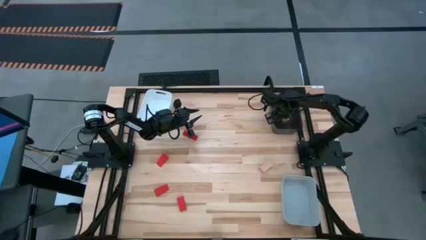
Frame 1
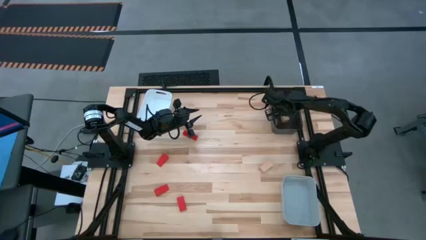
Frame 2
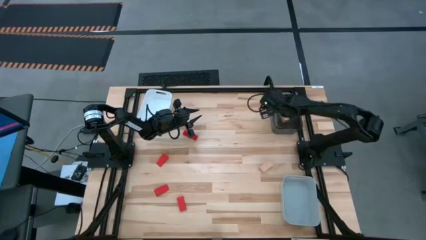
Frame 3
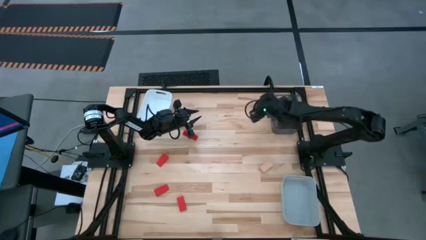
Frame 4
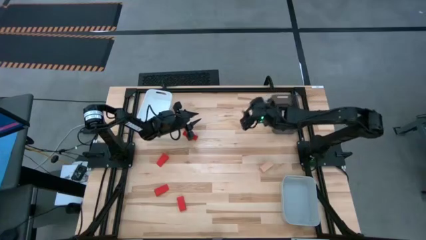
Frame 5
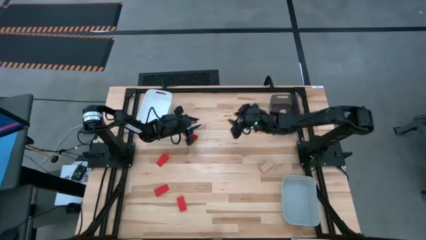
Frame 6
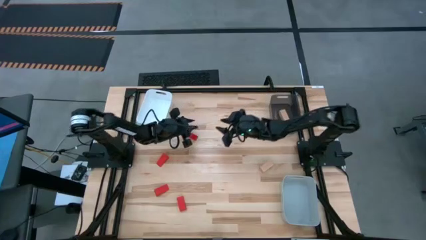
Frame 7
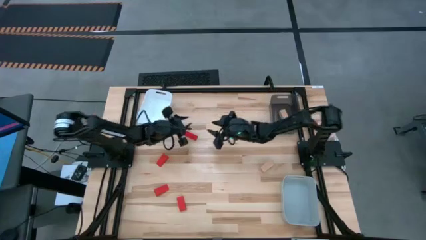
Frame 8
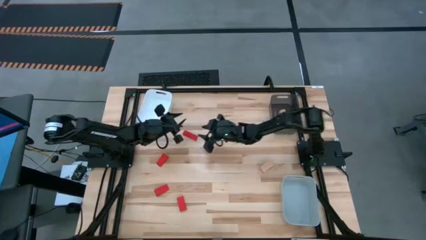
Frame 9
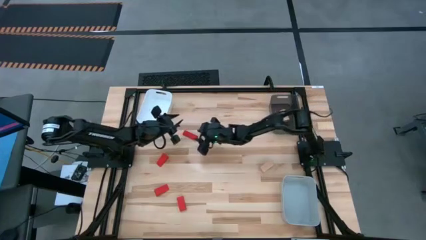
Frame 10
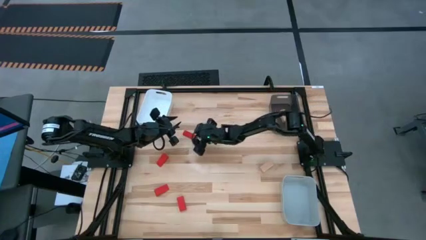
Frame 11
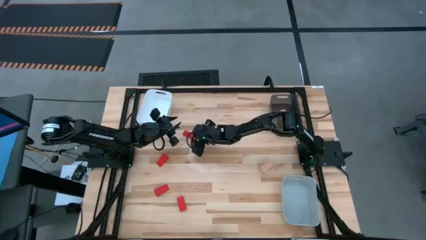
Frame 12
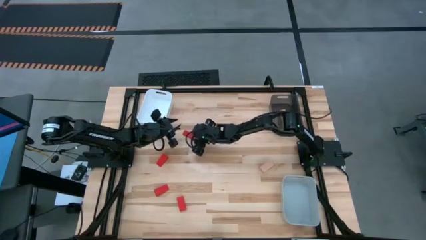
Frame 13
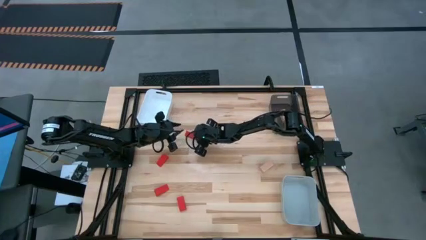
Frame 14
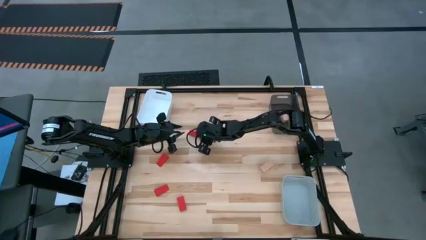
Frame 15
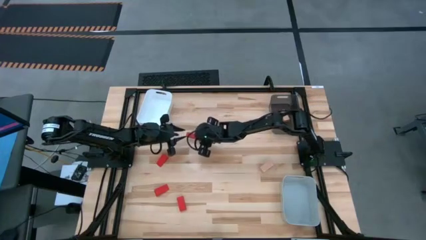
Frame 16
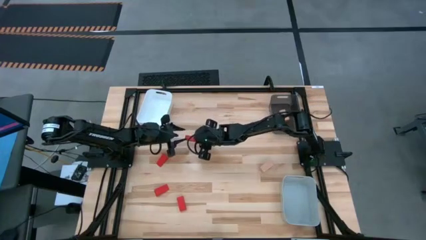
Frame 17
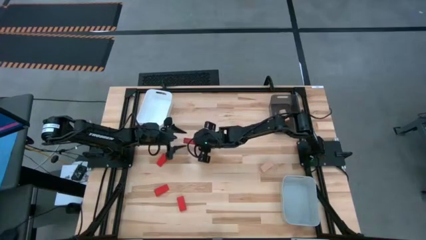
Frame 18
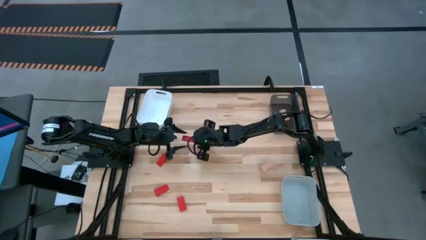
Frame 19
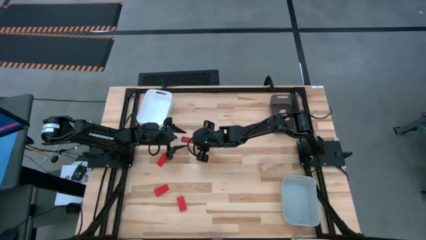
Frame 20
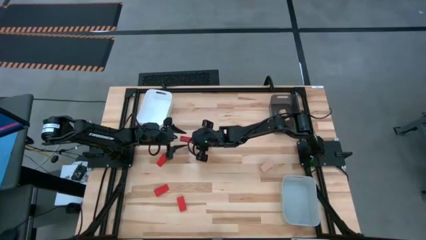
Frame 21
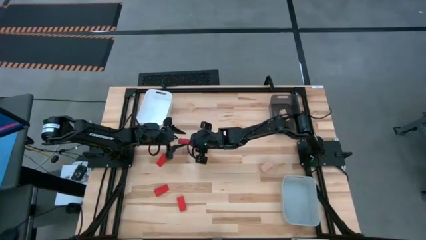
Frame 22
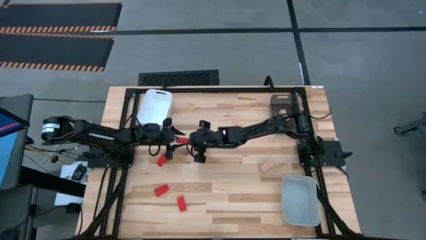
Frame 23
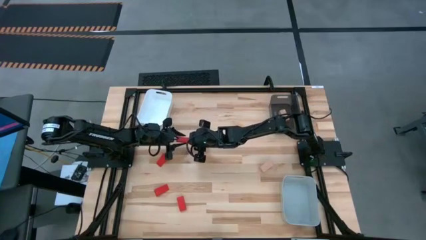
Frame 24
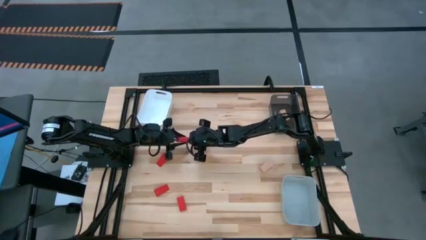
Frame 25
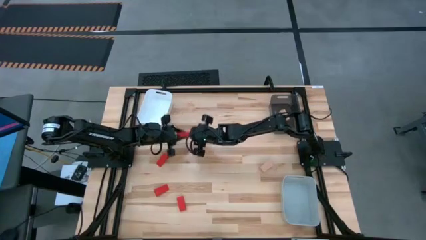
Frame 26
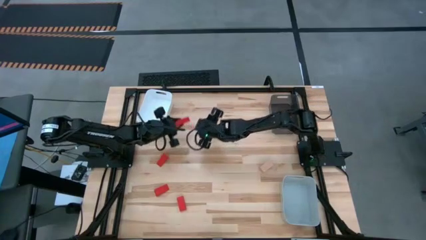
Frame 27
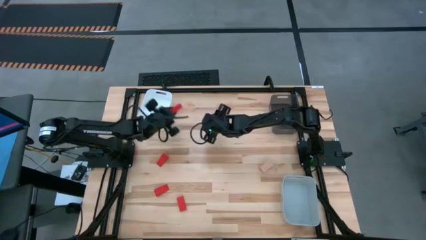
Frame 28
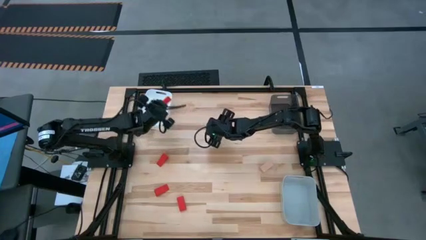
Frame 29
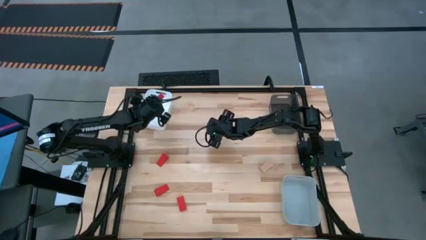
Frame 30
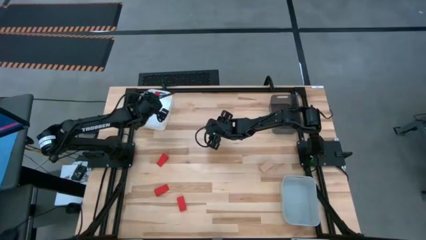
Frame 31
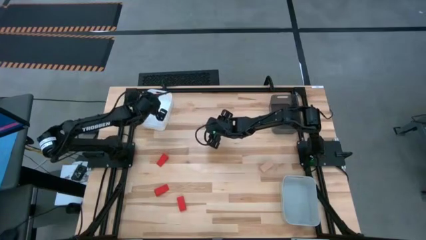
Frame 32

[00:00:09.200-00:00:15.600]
Task: Sort & place blocks by color
Put the red block into the white bin

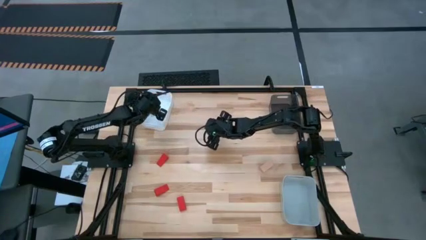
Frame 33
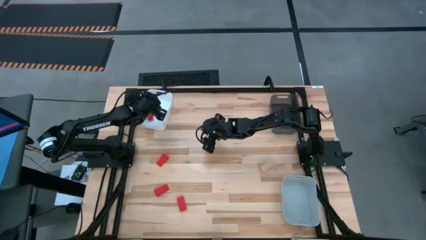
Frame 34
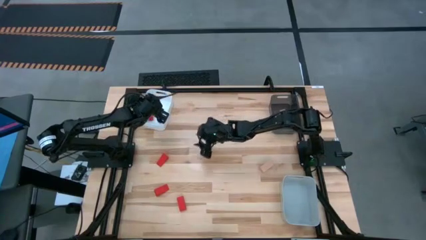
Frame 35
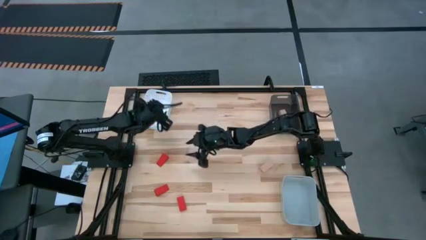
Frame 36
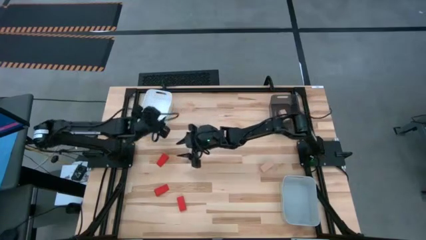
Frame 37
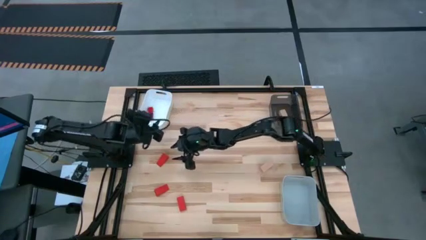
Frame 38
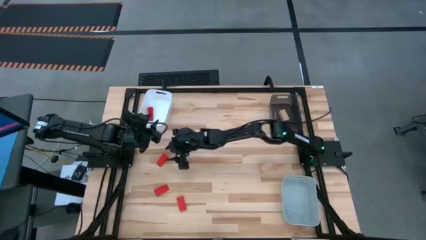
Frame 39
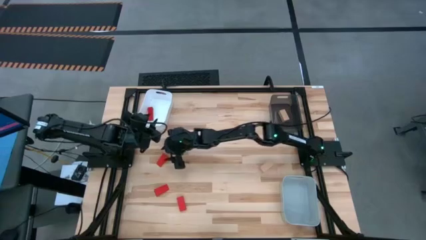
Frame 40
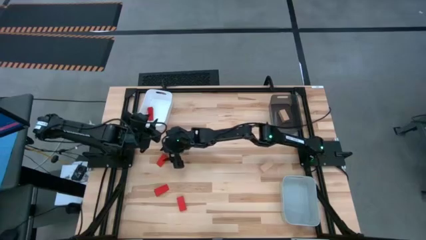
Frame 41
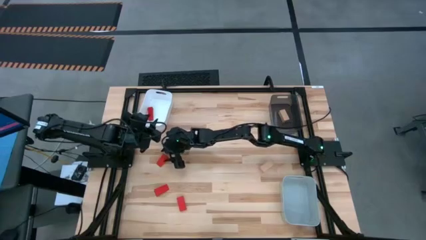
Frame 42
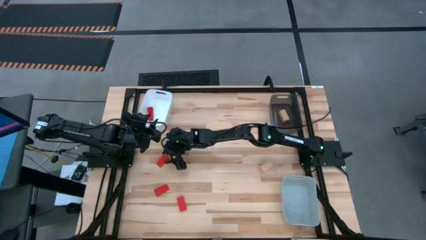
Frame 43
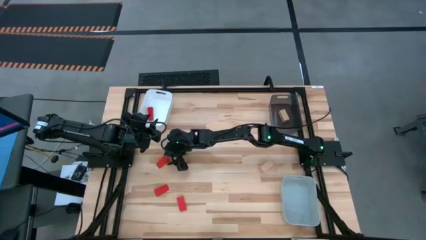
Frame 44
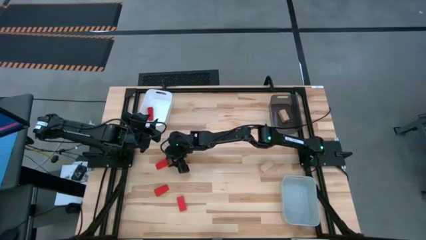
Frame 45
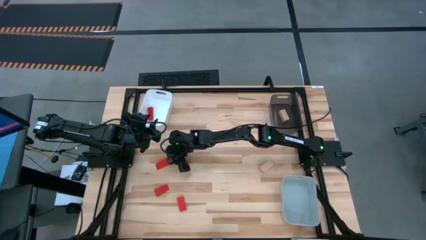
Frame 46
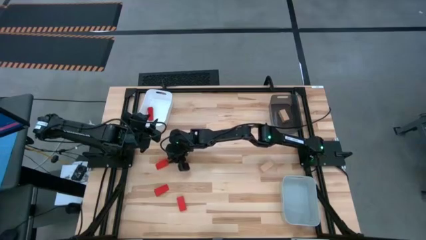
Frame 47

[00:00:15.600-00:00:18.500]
Put the red block into the black bin

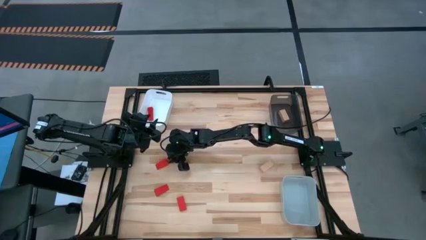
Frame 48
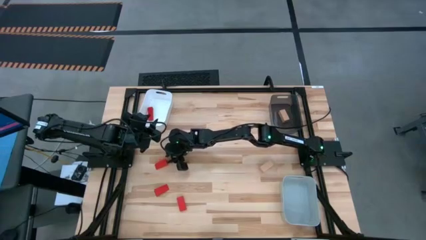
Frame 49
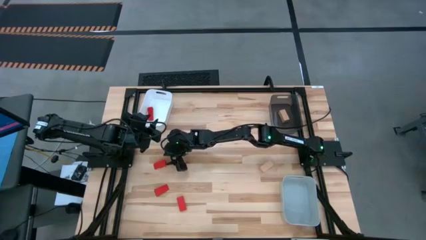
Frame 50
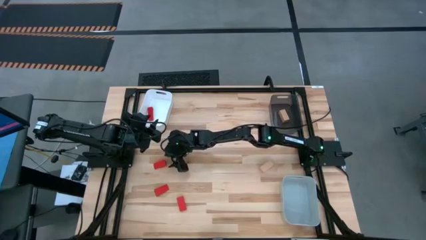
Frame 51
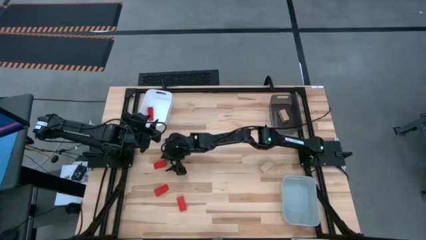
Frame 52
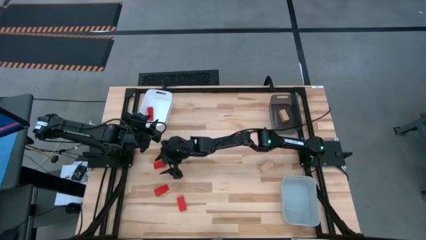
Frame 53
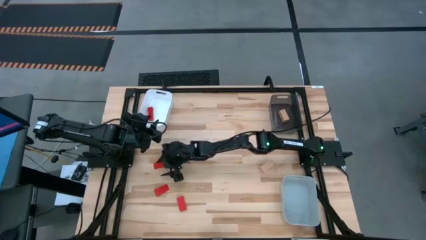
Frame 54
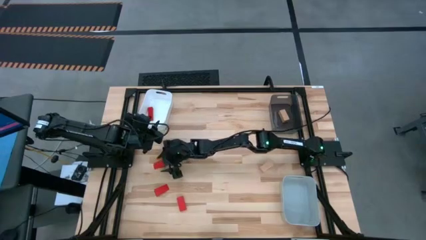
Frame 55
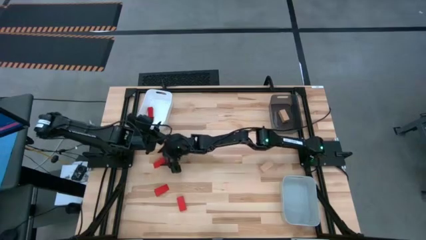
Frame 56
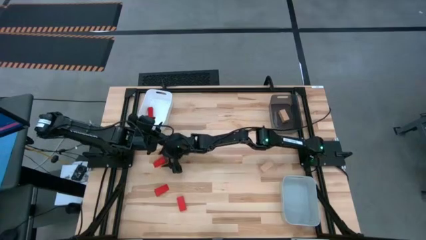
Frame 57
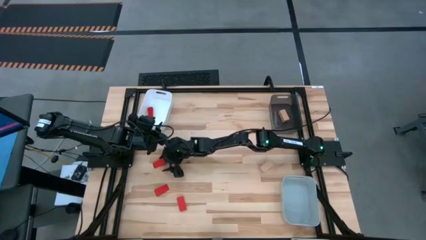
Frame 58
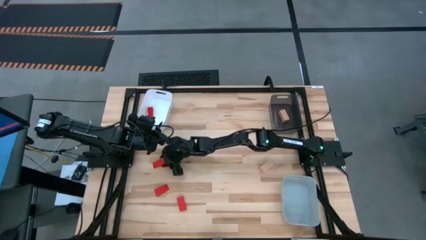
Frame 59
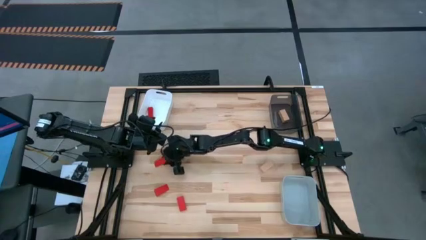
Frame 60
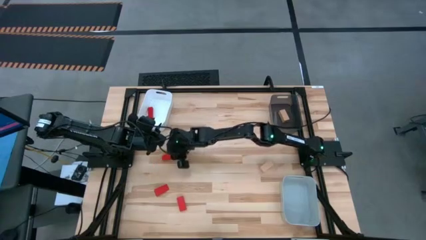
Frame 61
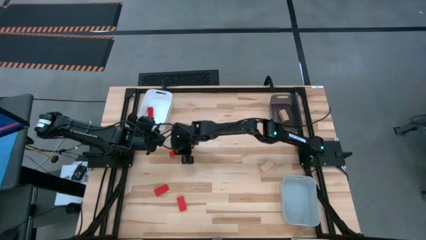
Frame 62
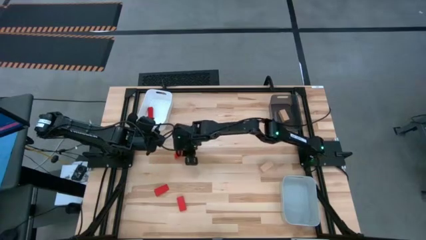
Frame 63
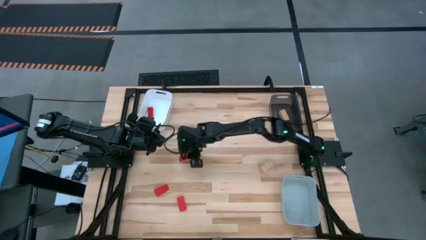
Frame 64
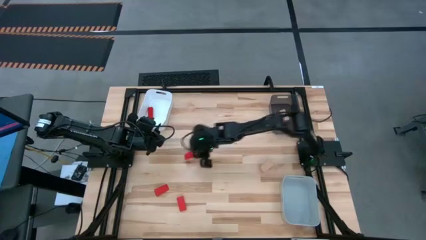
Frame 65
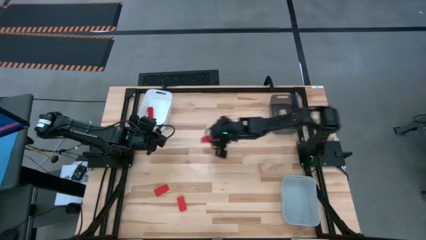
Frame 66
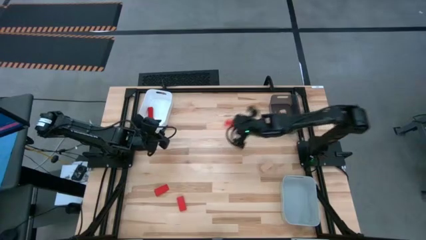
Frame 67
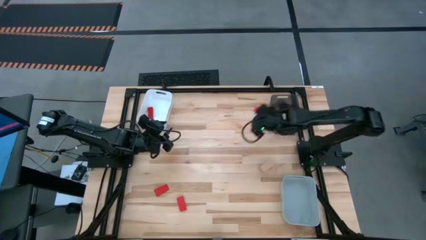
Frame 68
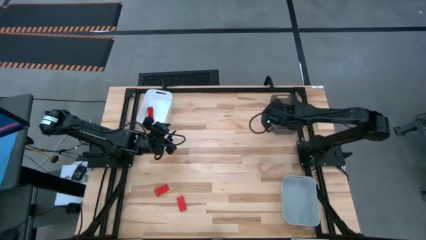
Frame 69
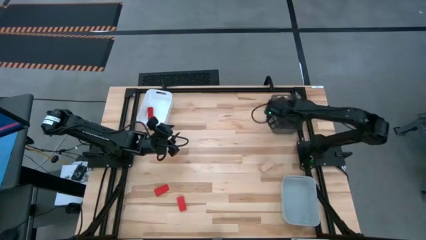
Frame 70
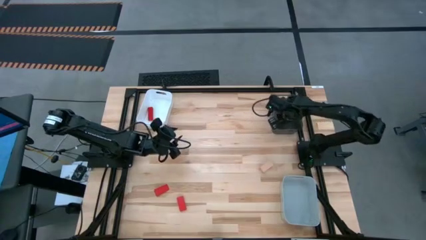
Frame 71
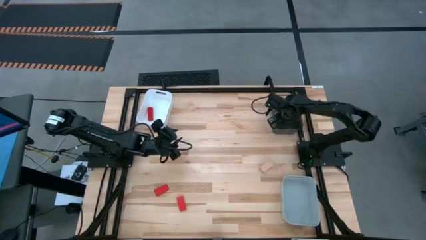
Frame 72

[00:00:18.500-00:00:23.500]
Put the red block into the black bin

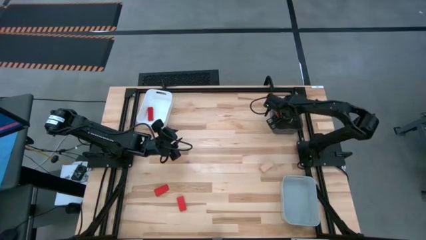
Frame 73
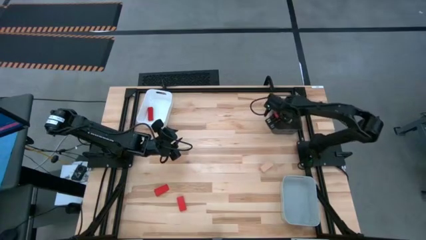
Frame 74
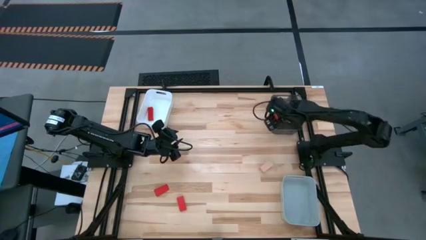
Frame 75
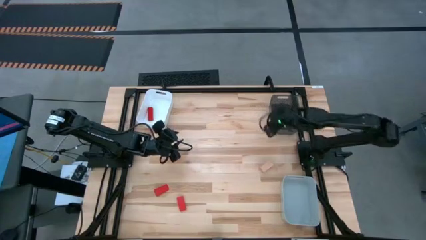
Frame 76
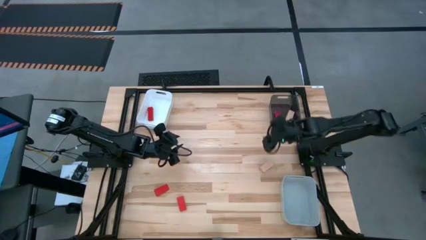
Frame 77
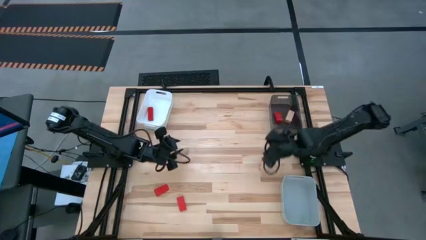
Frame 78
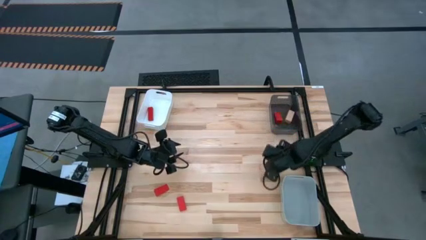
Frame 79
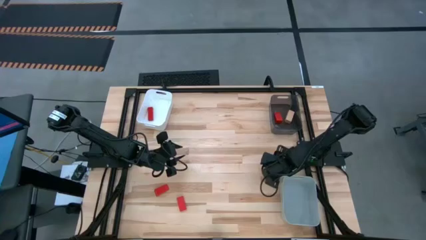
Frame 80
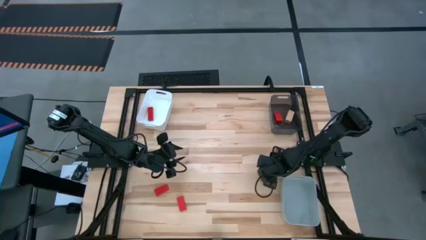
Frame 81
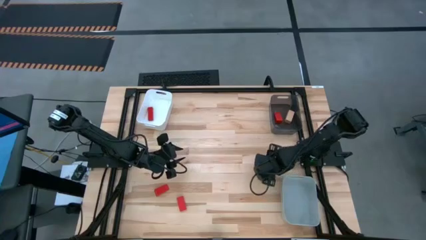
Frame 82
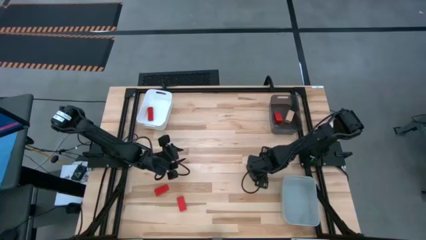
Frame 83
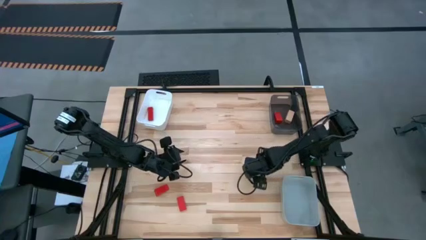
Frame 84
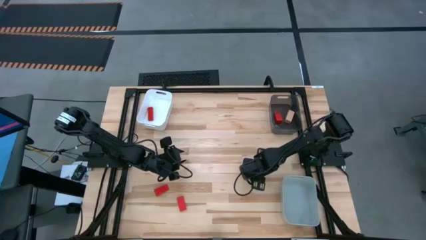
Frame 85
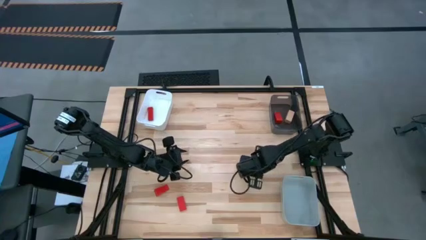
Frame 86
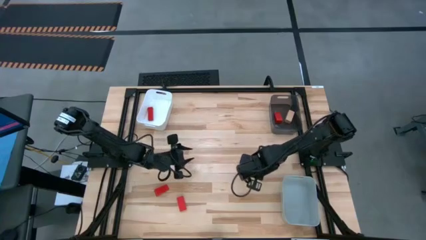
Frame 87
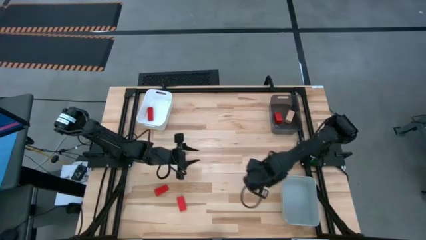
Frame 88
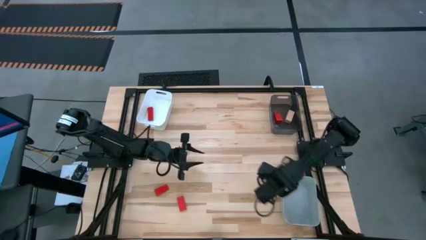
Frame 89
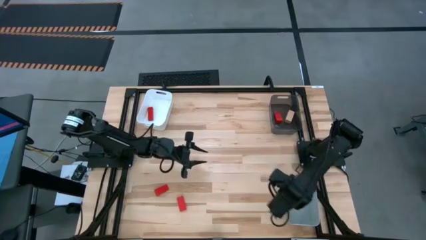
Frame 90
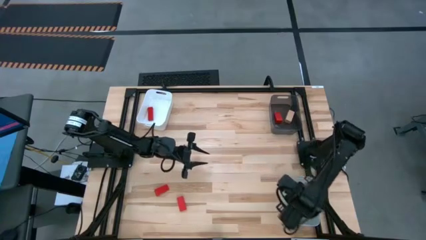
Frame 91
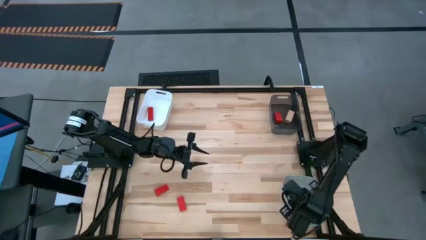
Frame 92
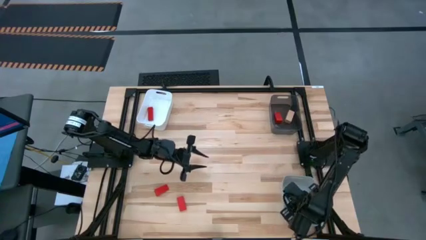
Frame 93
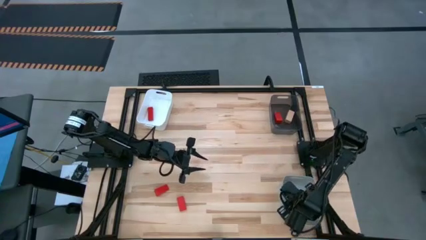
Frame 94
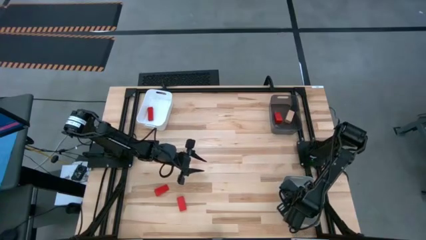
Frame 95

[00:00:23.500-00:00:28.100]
Put the brown block into the gray bin
